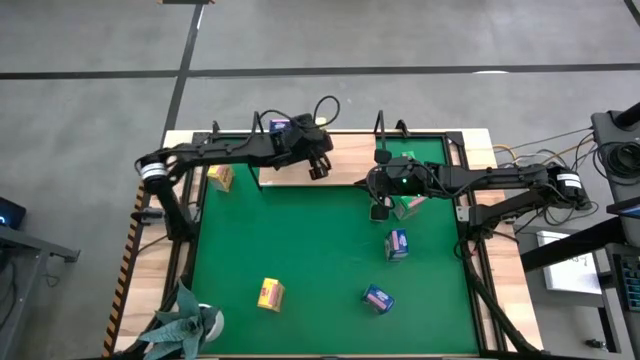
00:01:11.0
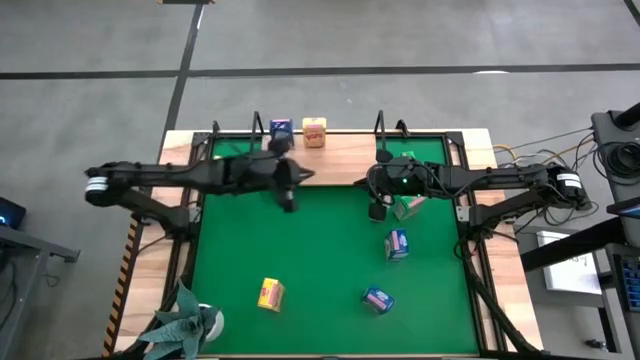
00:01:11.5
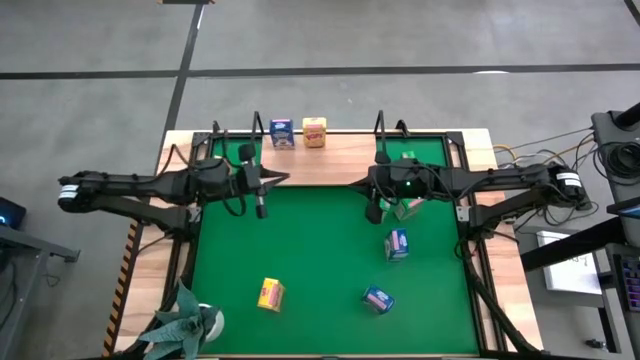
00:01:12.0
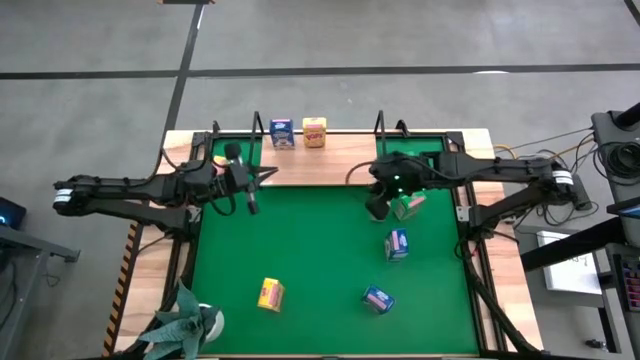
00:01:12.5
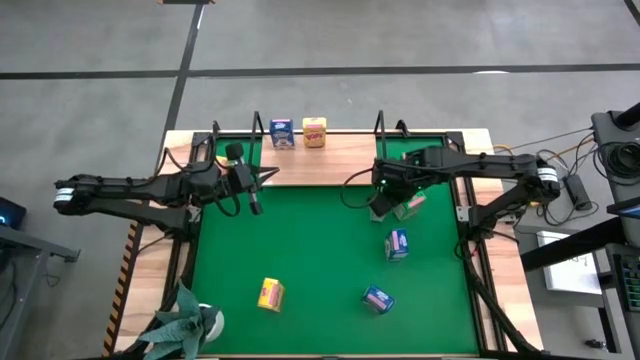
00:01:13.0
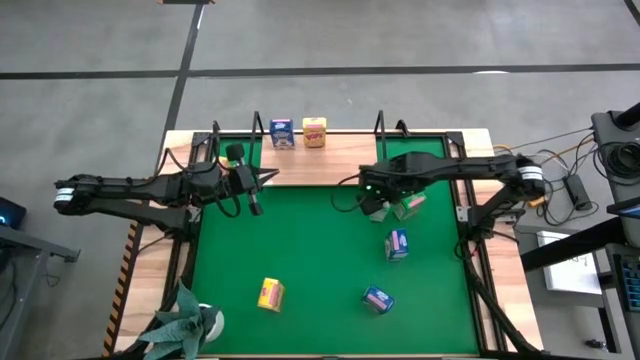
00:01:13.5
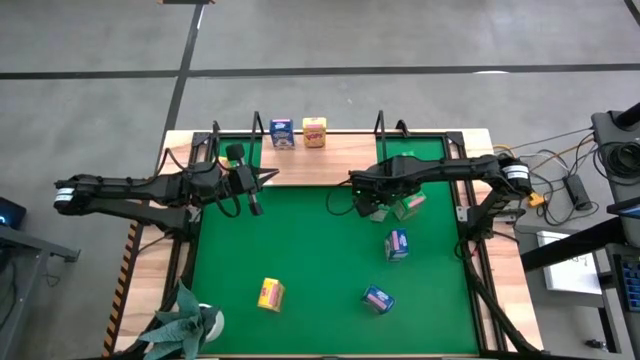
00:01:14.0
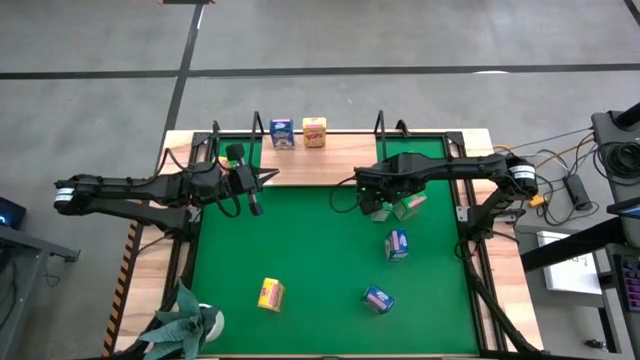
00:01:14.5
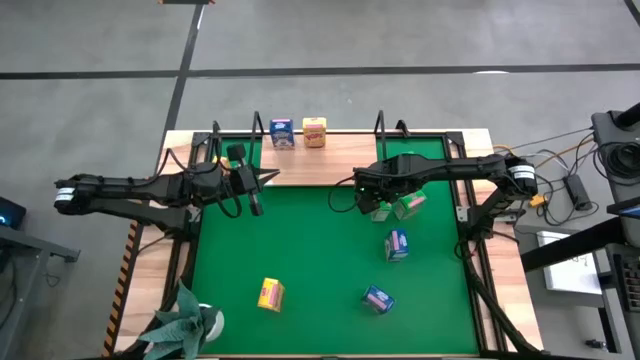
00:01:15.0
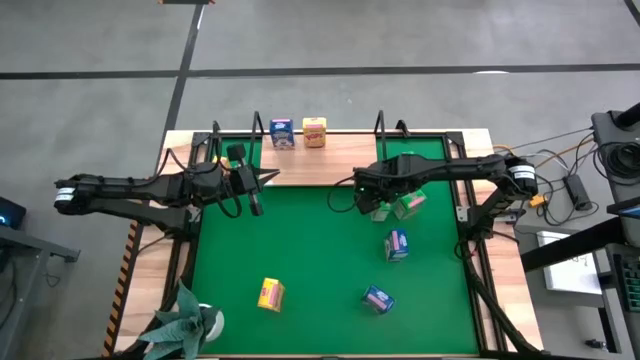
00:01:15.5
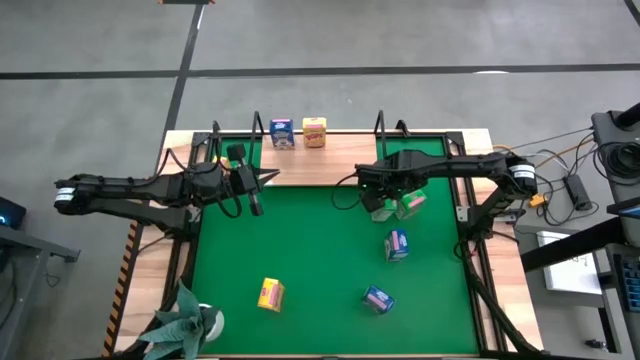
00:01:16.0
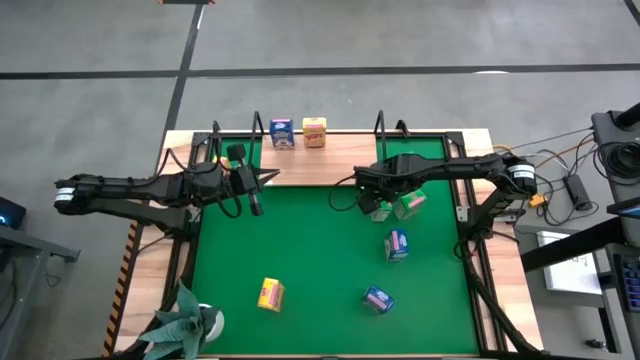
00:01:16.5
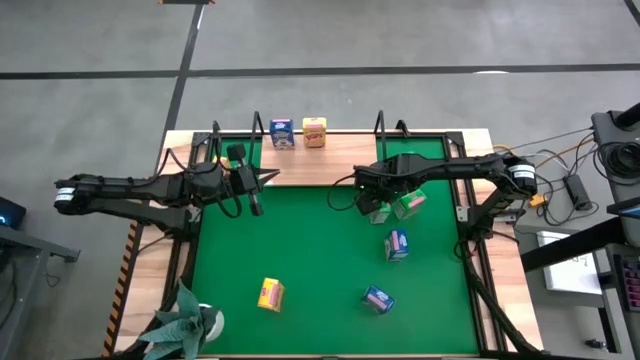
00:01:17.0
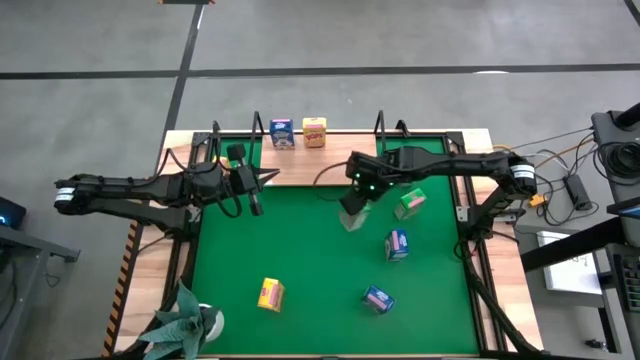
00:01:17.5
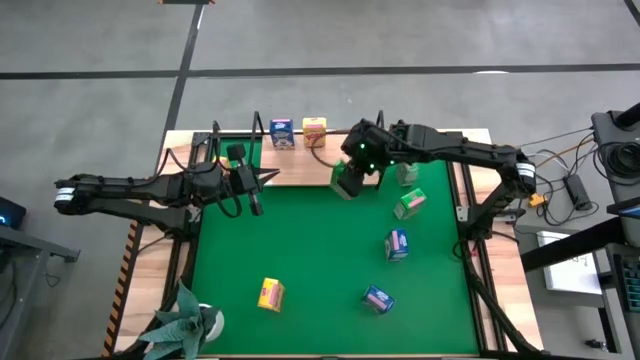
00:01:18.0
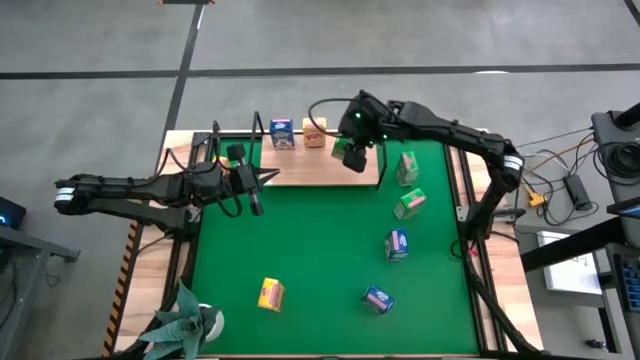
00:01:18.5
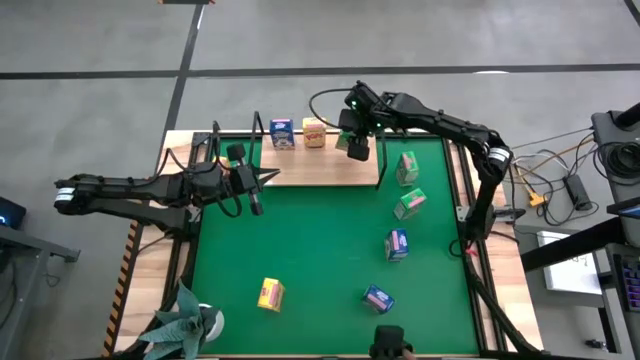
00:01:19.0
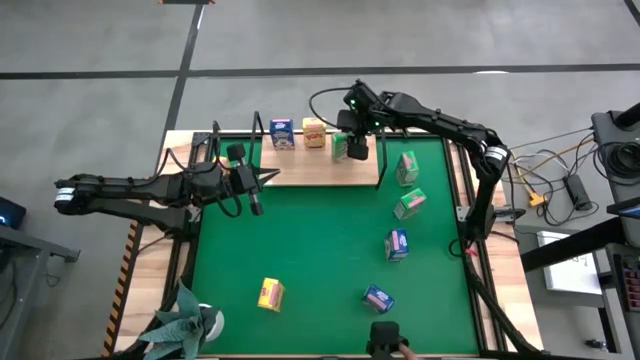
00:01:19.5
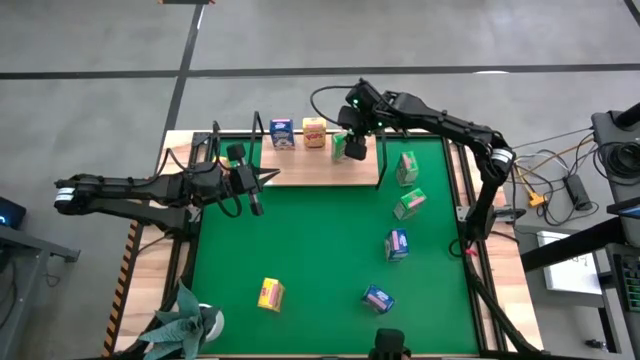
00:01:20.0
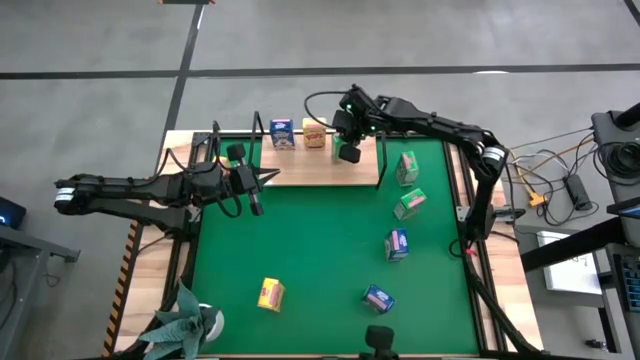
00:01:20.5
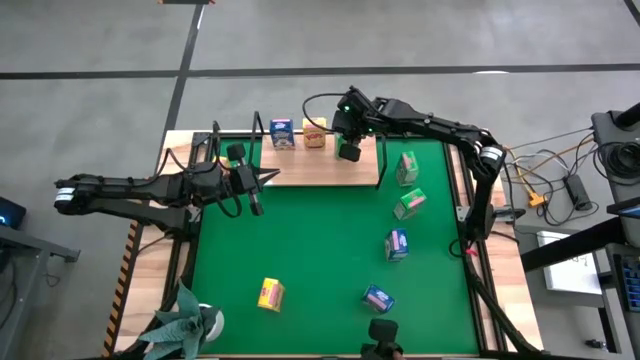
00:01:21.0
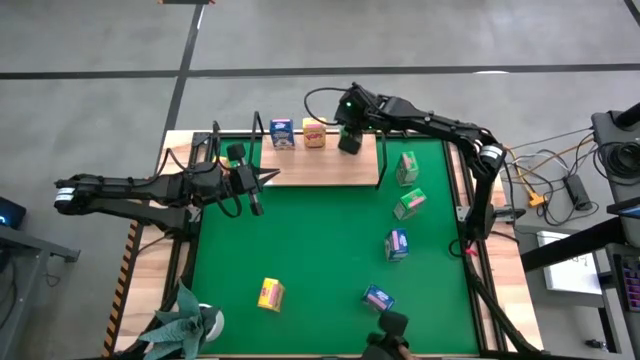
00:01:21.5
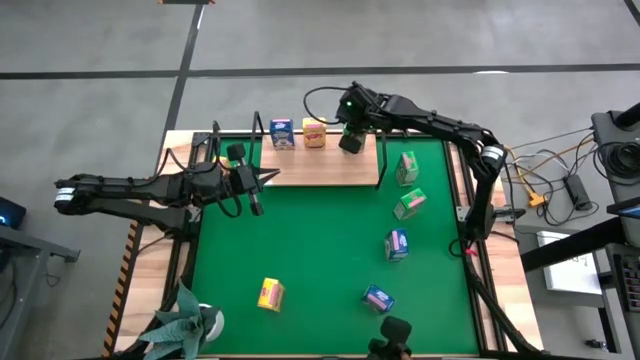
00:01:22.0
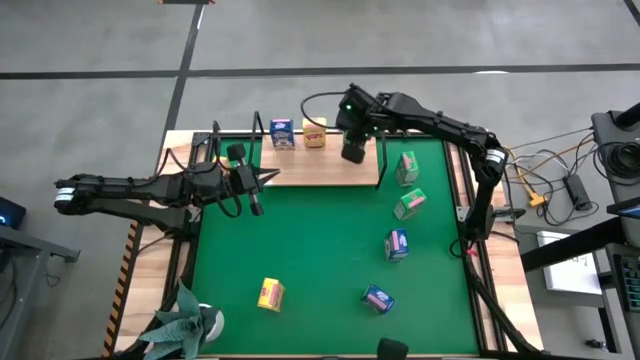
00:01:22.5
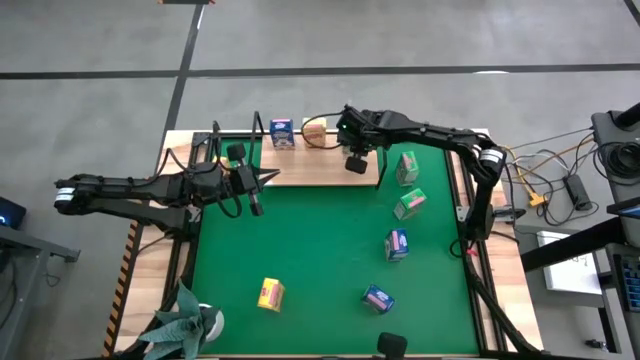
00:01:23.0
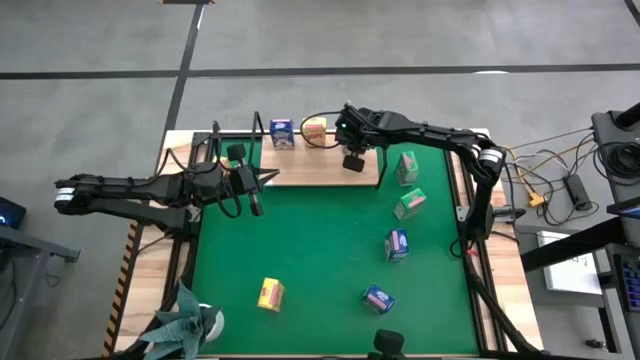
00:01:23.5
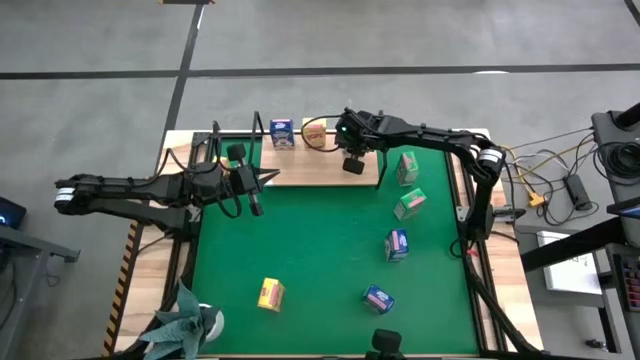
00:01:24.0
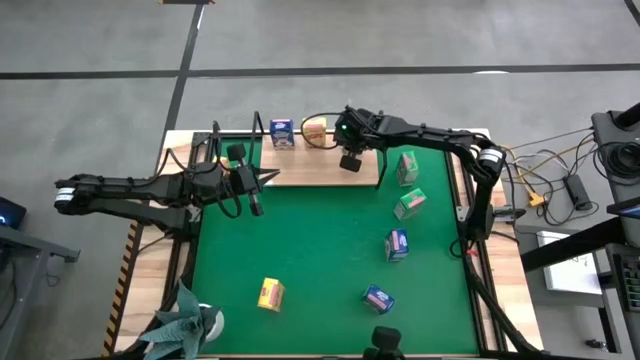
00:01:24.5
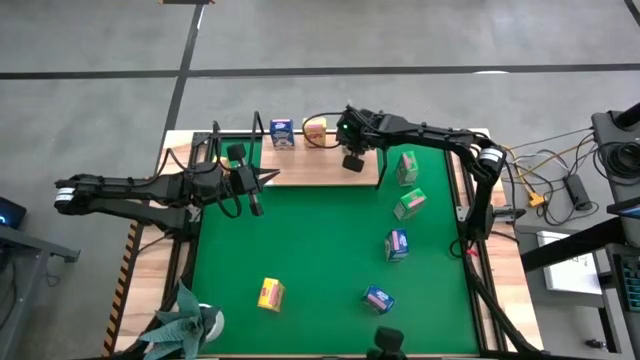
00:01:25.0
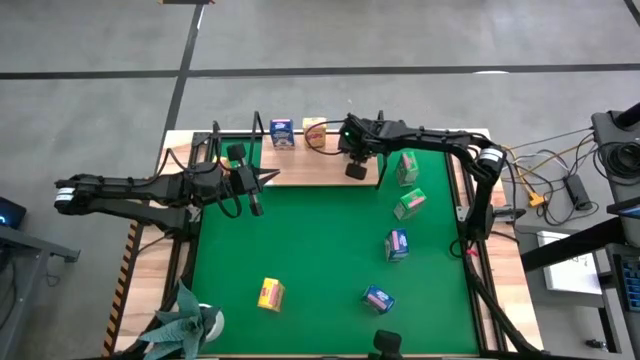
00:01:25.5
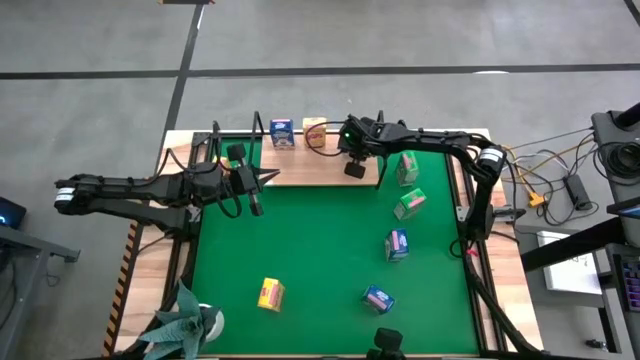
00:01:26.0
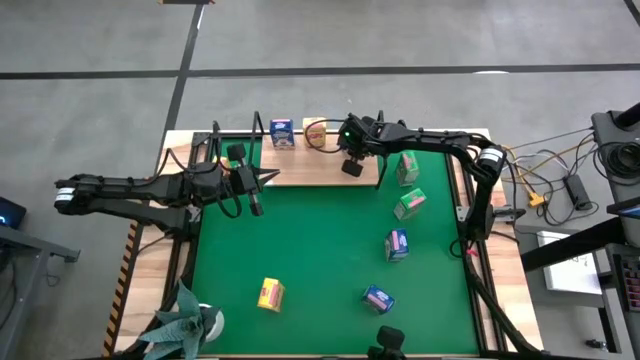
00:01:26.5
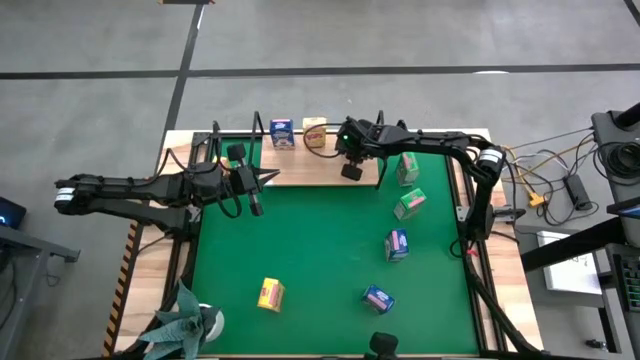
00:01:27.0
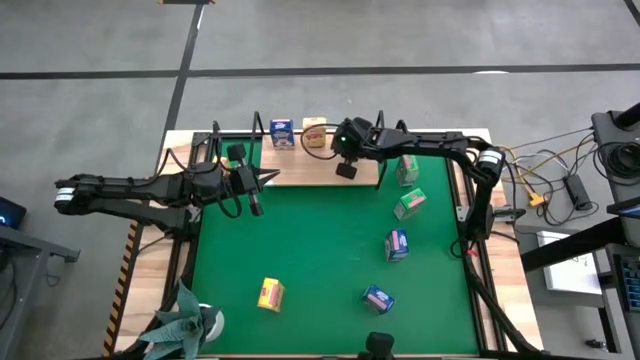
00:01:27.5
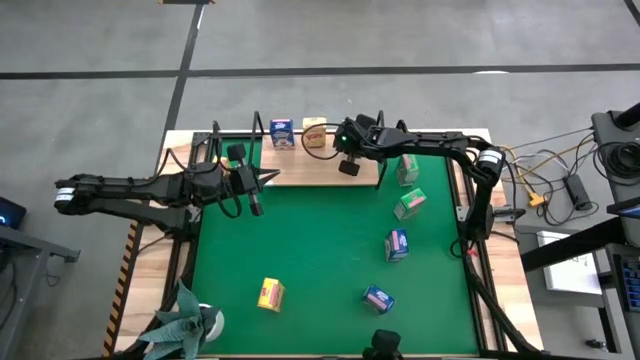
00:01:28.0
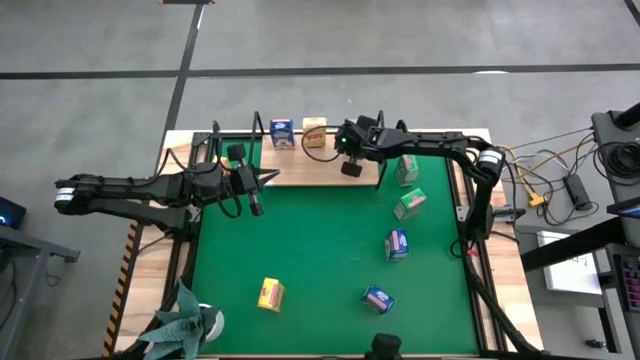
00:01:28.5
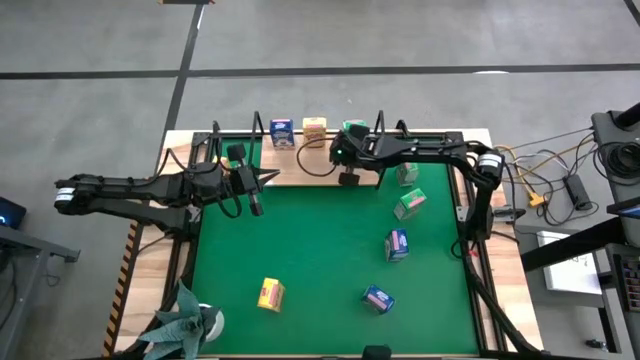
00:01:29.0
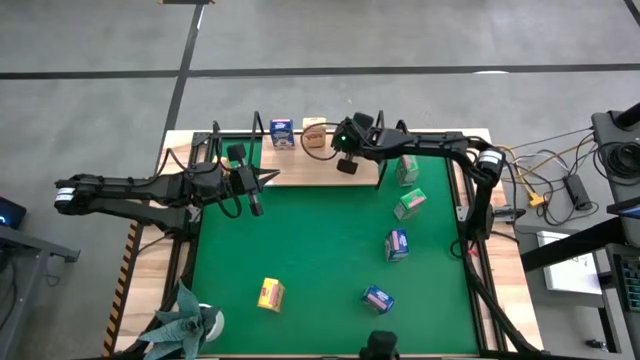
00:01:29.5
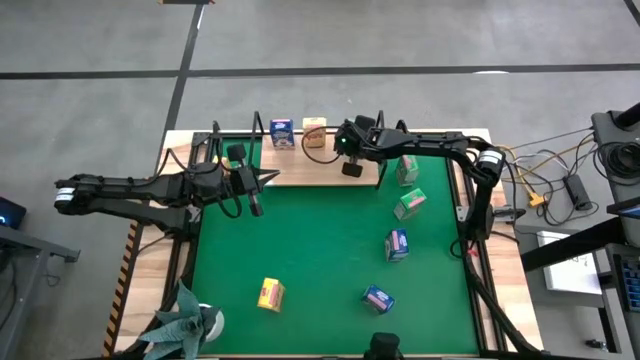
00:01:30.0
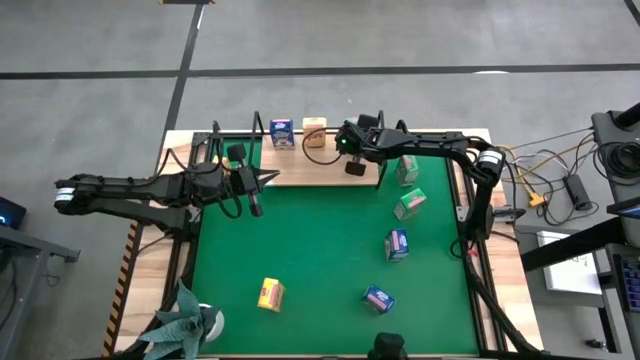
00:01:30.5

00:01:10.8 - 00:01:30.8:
Task: Stack cereal on shelf
Put the bottom left green cereal box on the shelf

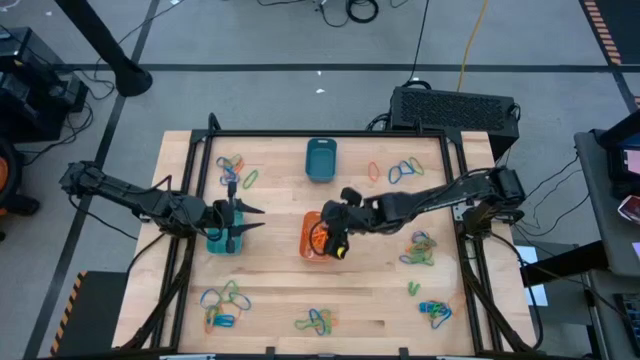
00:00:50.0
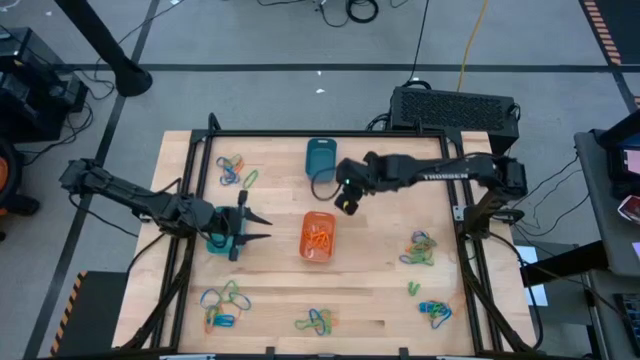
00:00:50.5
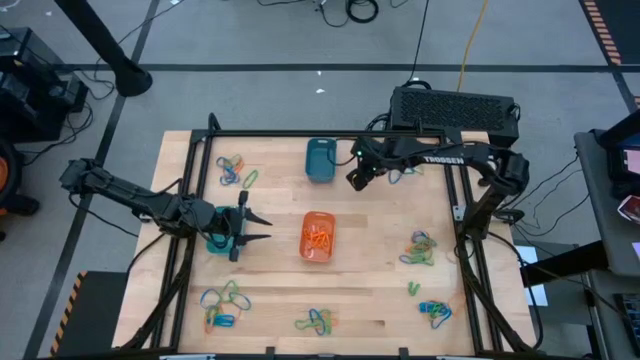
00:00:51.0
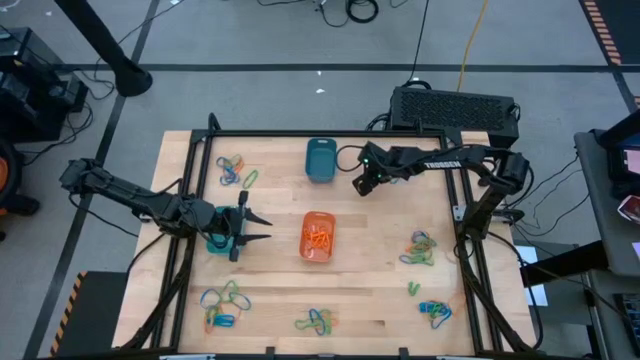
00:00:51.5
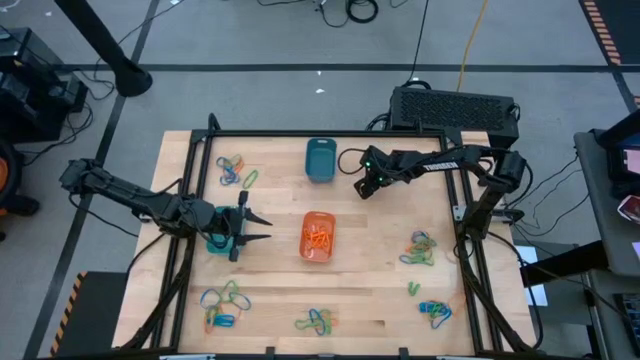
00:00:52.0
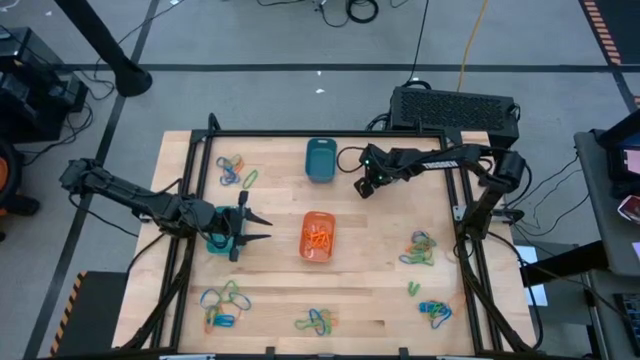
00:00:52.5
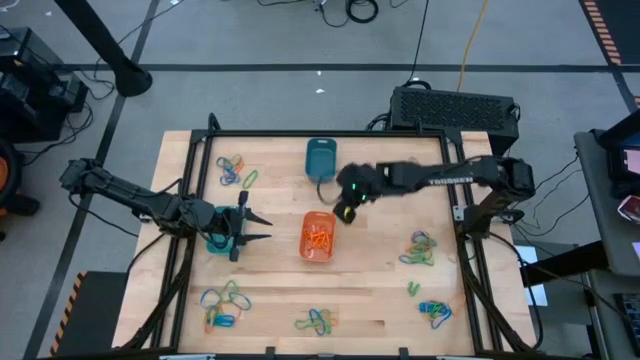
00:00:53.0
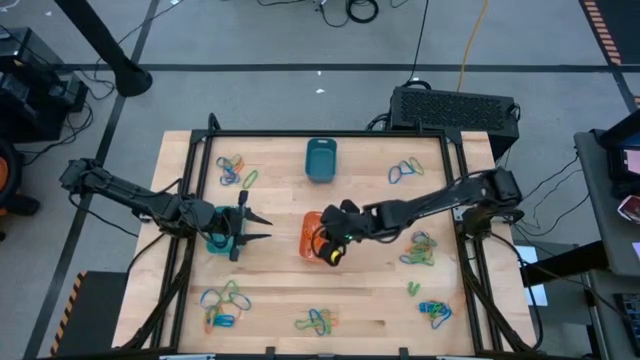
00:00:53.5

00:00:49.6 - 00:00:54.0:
Task: Sort rubber bands into baskets
Put the orange rubber band into the orange bin
